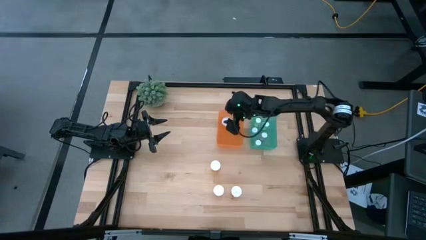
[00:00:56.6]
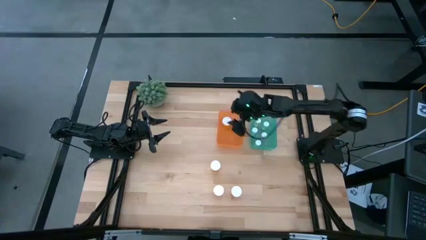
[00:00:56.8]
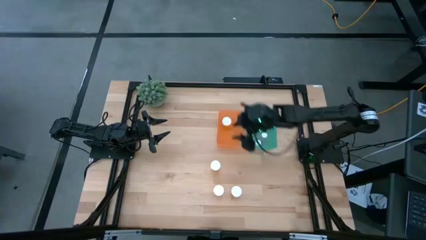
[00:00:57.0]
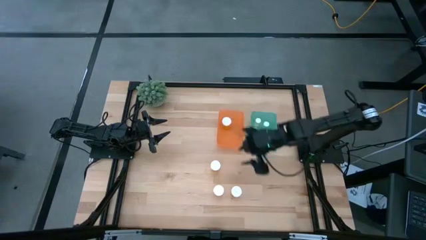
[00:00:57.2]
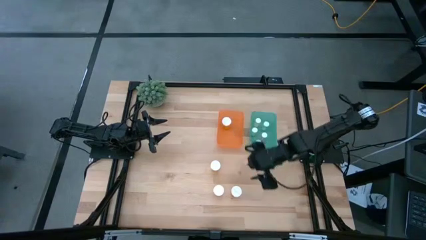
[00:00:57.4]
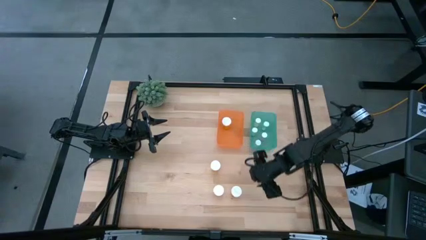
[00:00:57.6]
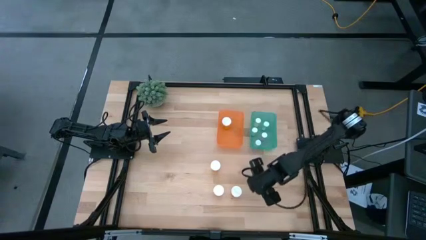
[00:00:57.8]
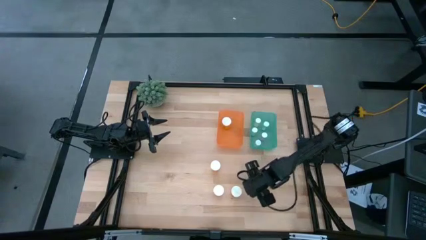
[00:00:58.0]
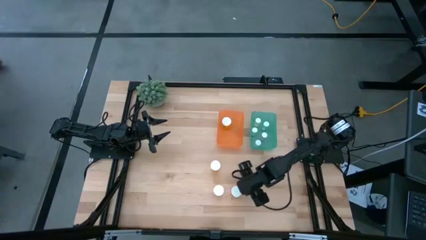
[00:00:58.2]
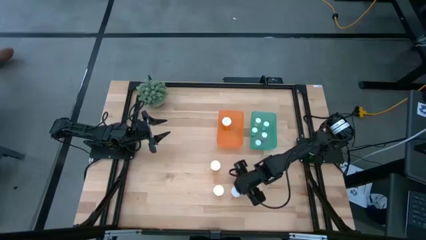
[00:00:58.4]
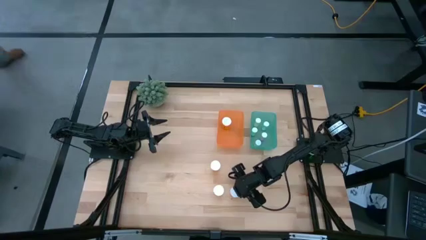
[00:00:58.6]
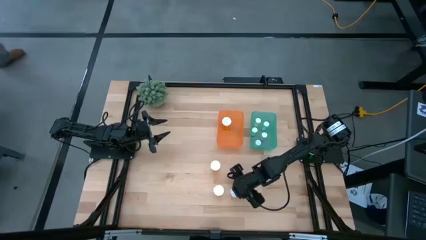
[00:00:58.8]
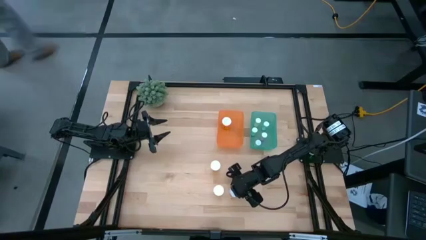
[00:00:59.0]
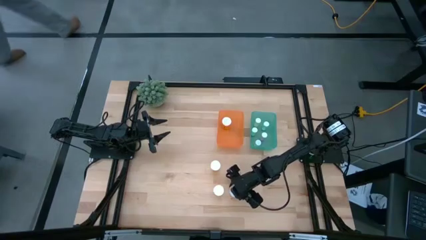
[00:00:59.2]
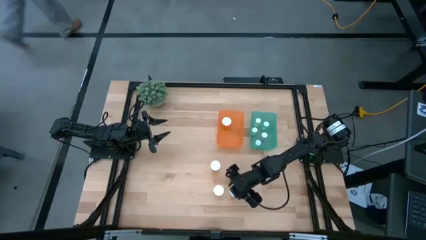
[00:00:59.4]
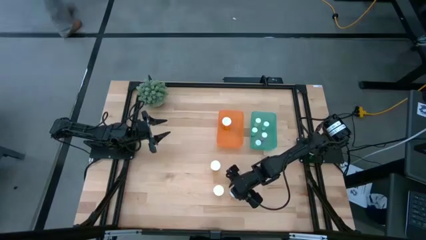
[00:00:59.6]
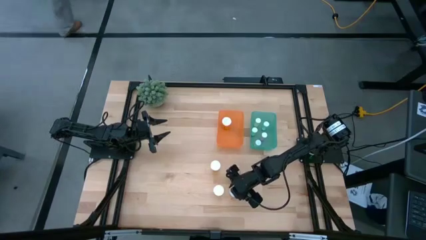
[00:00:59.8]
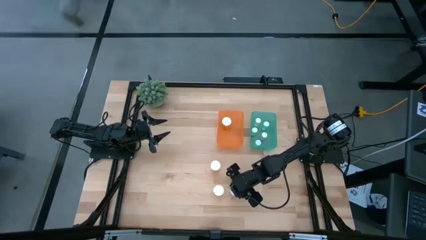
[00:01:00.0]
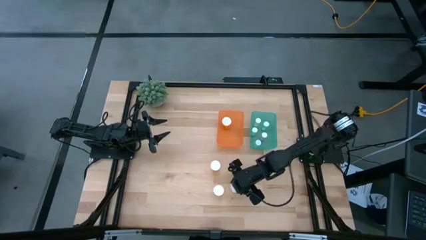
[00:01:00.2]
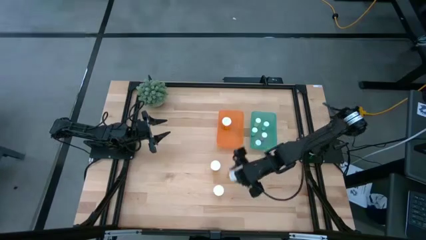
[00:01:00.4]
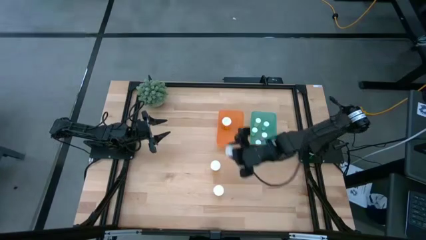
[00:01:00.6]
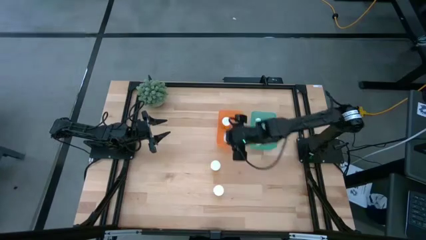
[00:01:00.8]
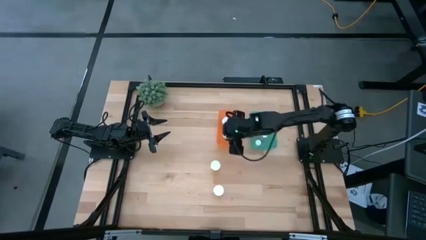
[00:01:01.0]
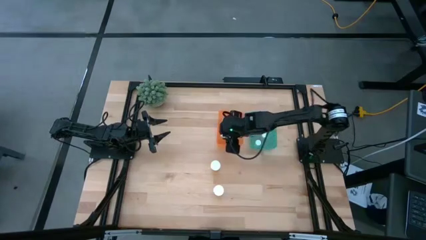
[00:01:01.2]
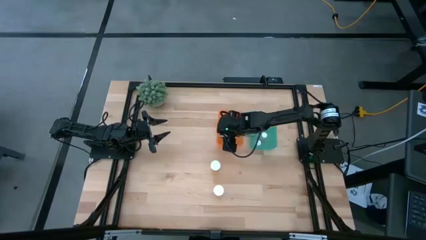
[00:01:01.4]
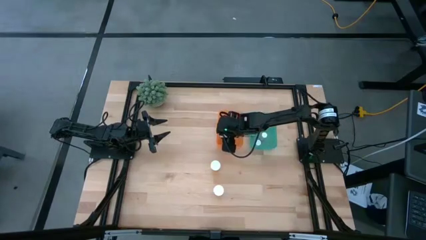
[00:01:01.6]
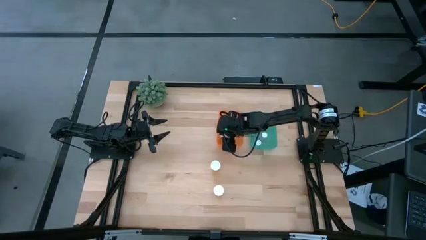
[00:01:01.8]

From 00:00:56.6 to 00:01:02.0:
Task: Pick and place medicine bottles into bin by pill shape (circle, oval)
Put the large orange pill bottle into the orange bin

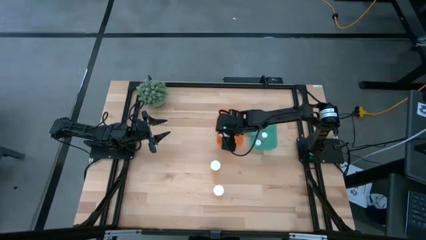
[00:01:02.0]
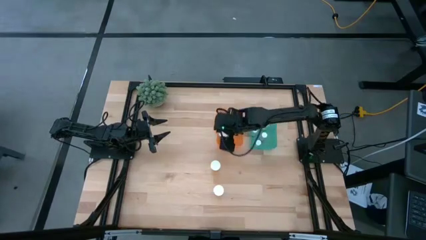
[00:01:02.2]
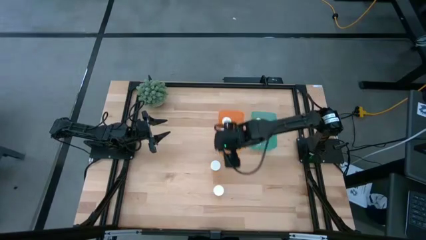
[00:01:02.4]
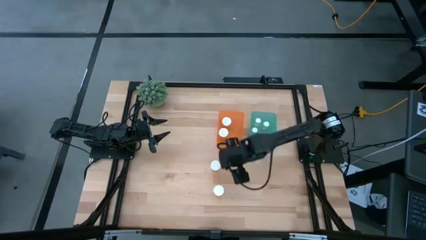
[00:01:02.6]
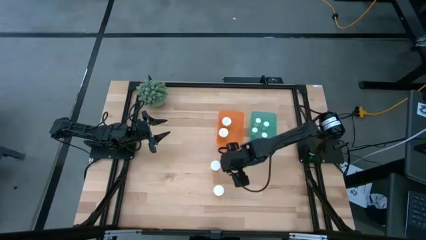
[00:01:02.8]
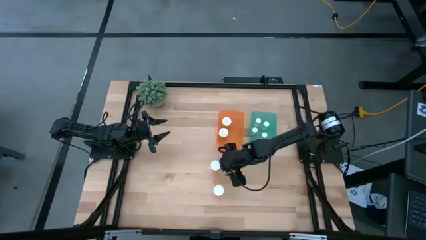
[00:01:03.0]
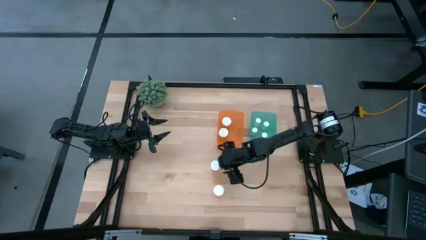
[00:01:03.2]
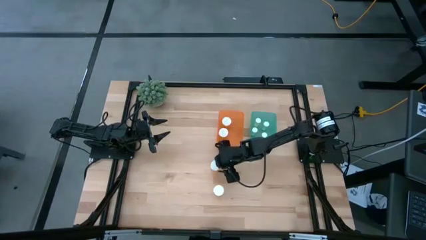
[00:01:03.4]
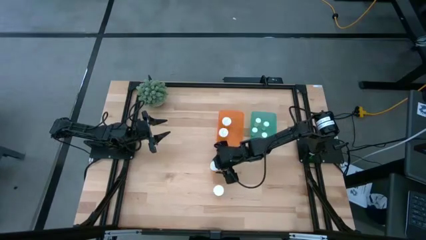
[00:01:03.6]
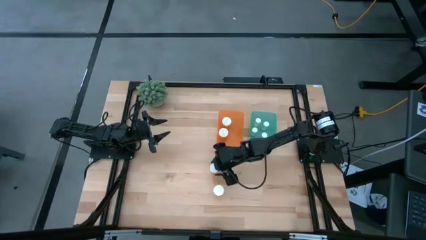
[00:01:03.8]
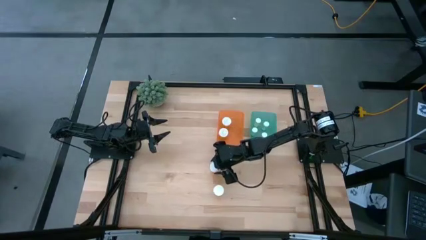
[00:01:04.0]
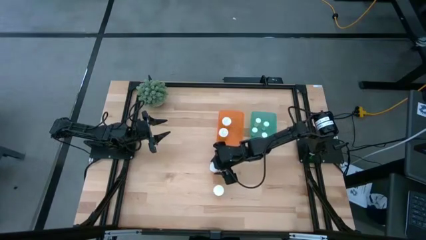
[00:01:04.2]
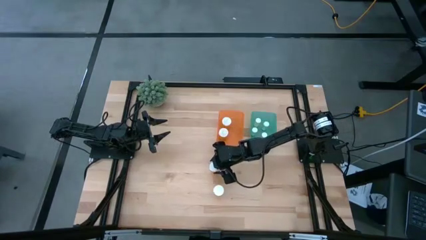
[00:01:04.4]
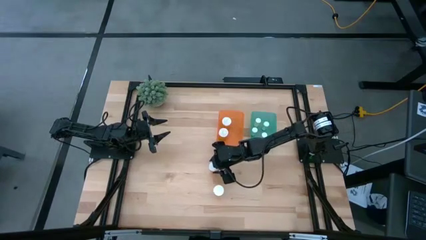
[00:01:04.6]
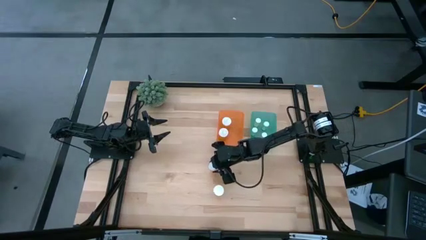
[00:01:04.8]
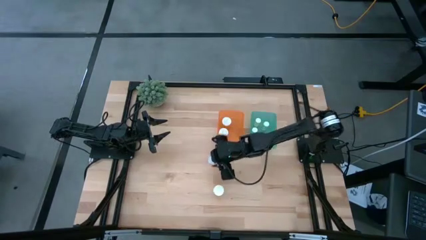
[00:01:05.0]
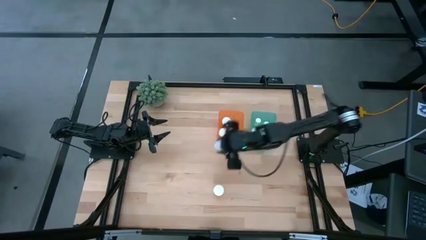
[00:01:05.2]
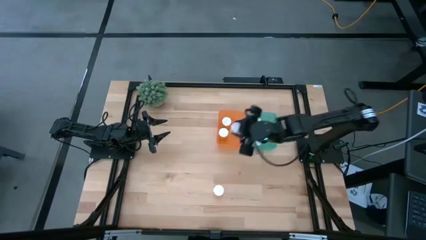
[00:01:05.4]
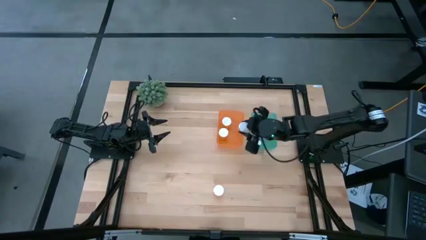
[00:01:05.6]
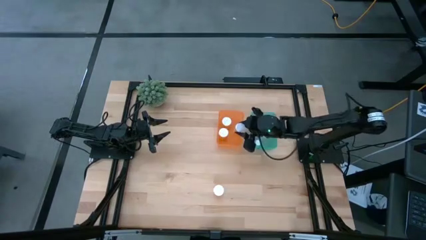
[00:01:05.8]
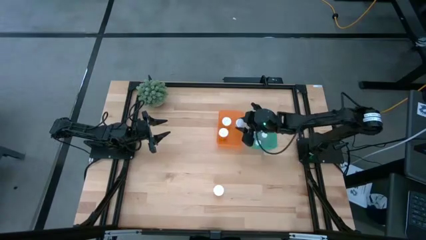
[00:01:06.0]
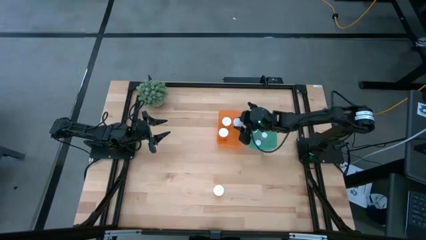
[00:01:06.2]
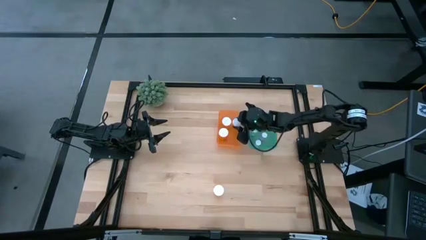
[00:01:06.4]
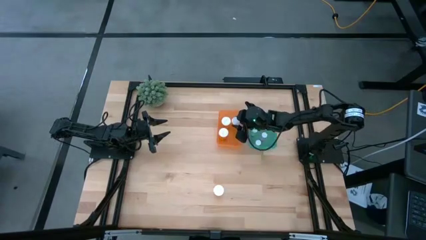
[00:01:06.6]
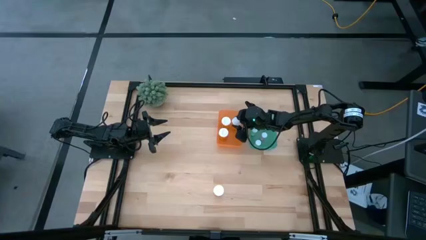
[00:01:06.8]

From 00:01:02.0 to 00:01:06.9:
Put the large orange pill bottle into the orange bin

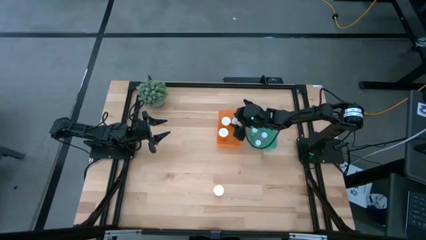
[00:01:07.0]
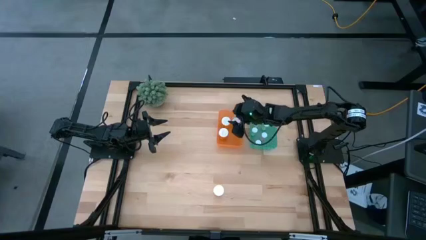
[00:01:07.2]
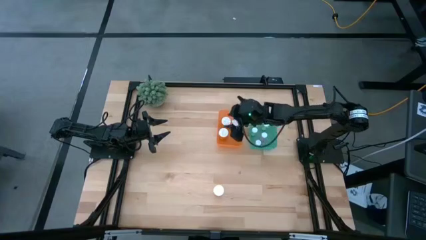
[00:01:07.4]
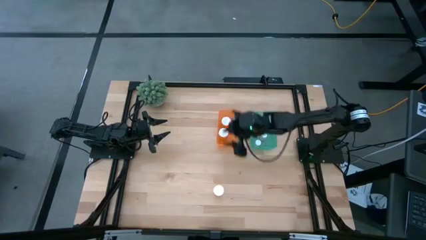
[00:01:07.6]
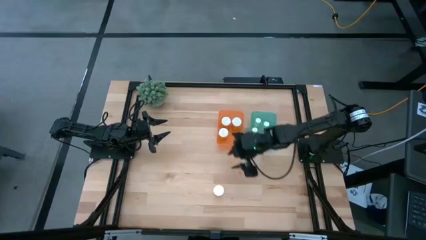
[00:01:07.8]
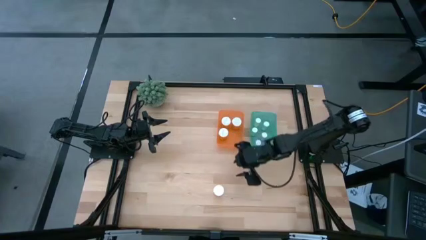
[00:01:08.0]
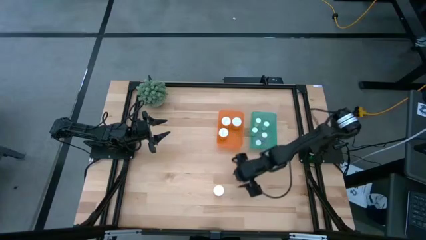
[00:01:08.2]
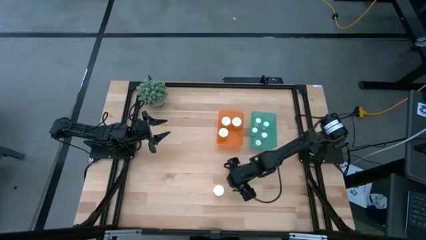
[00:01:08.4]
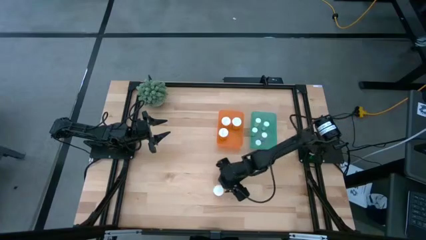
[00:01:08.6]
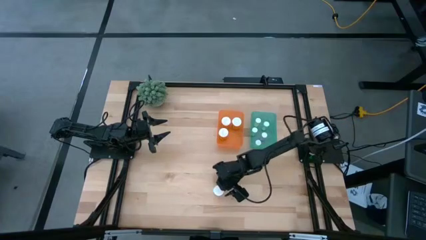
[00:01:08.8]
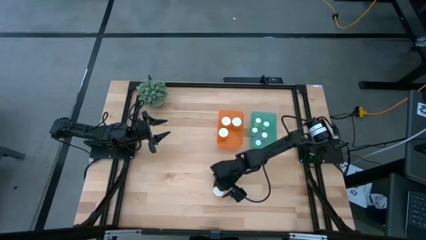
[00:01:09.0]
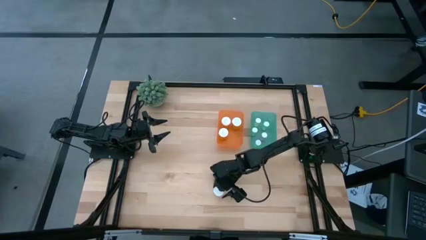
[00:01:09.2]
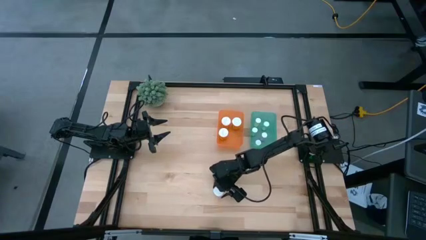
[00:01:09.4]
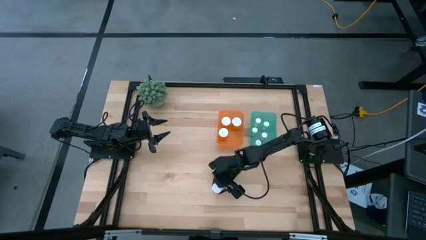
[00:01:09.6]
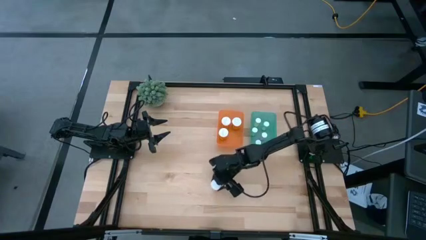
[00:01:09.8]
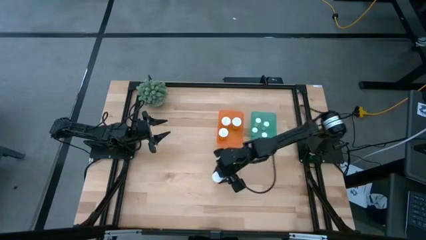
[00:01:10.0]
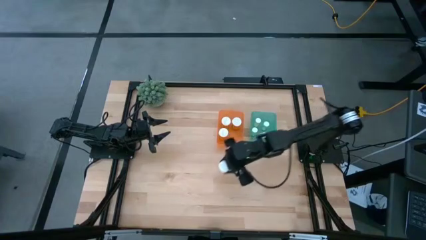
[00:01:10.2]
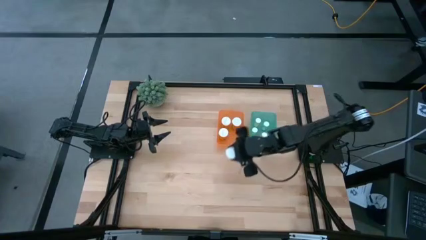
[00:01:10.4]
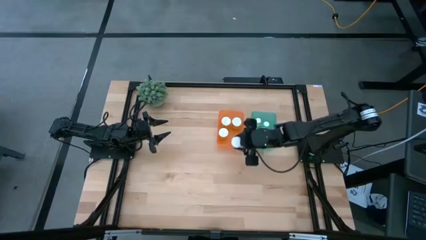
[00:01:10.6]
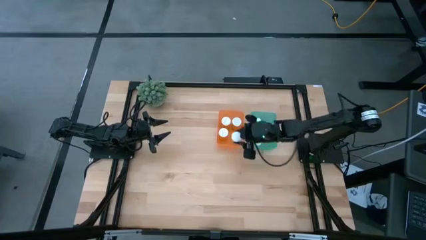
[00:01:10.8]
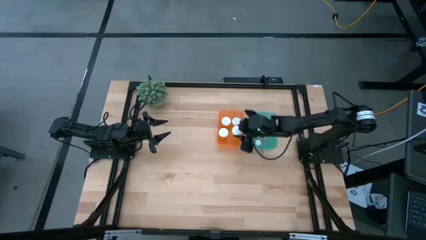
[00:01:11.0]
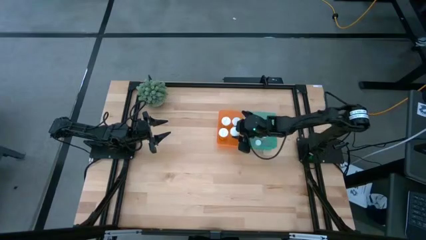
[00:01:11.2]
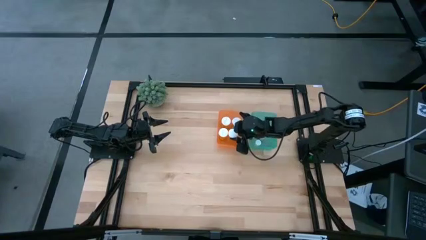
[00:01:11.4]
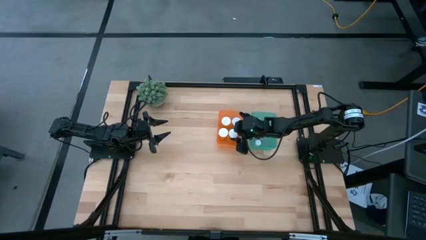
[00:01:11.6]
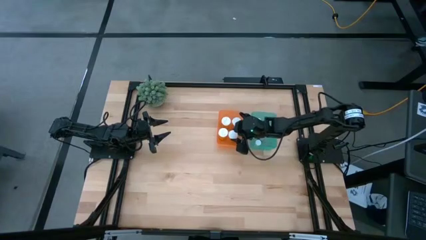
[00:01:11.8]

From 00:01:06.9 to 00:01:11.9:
Put the large orange pill bottle into the orange bin
